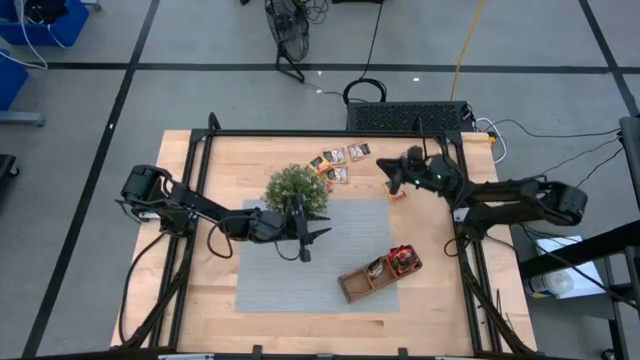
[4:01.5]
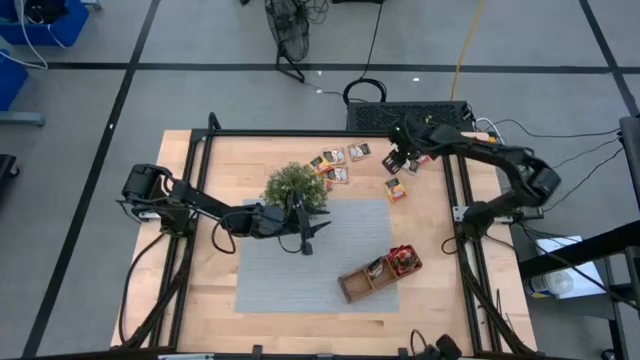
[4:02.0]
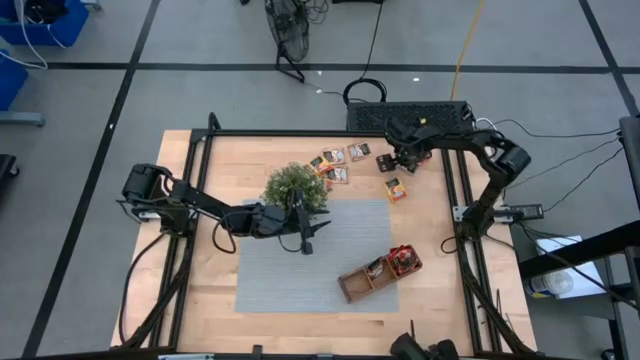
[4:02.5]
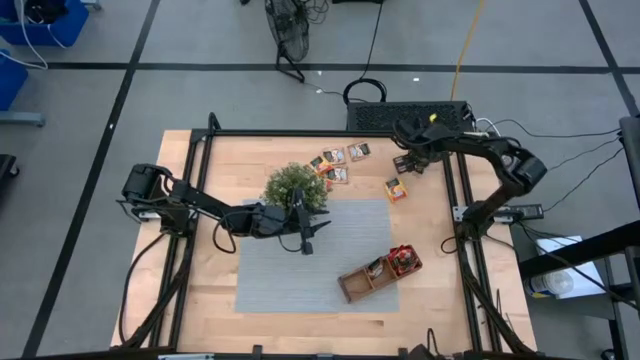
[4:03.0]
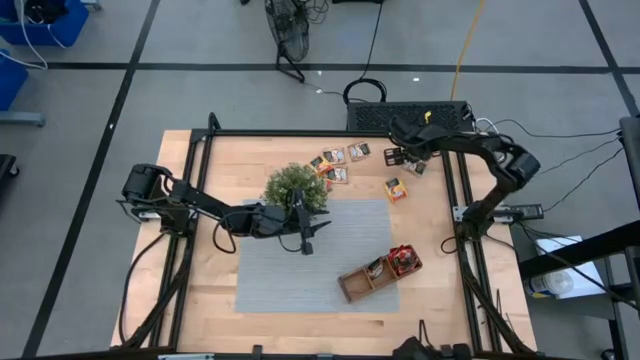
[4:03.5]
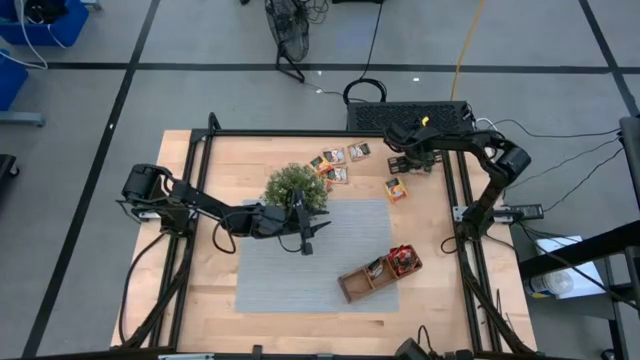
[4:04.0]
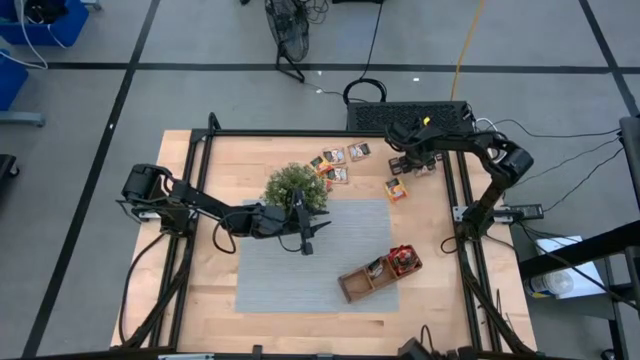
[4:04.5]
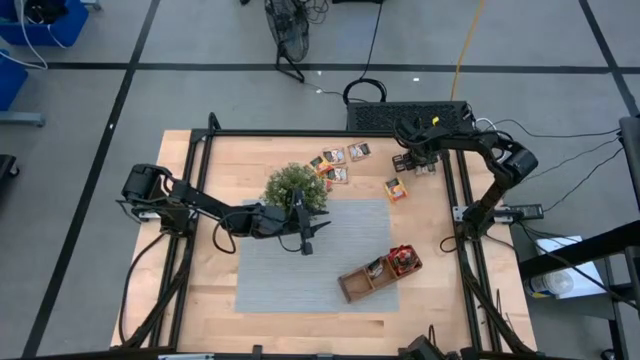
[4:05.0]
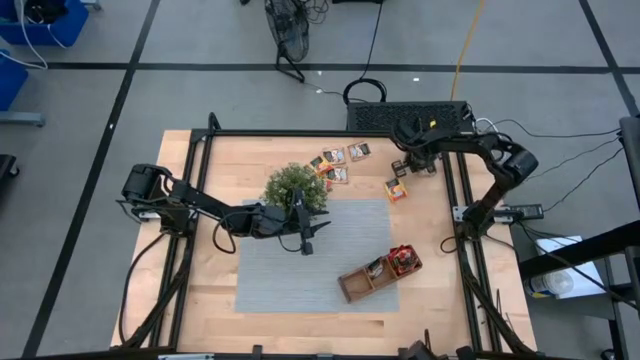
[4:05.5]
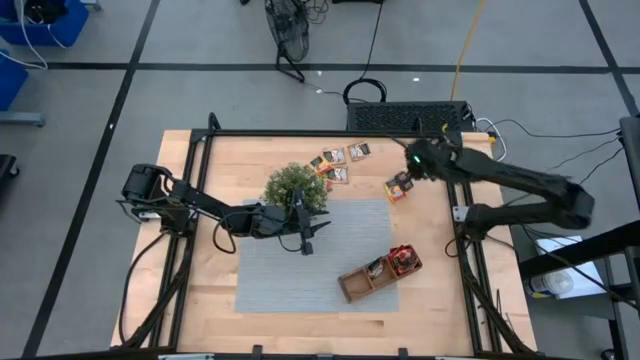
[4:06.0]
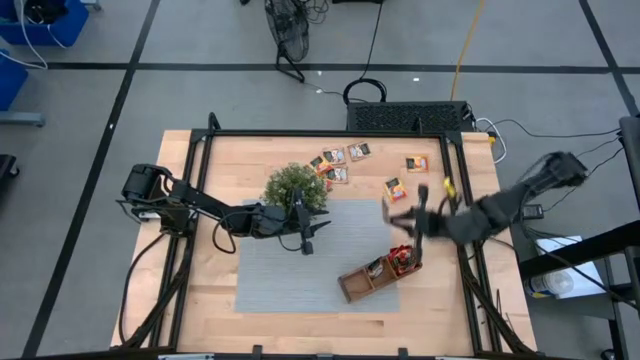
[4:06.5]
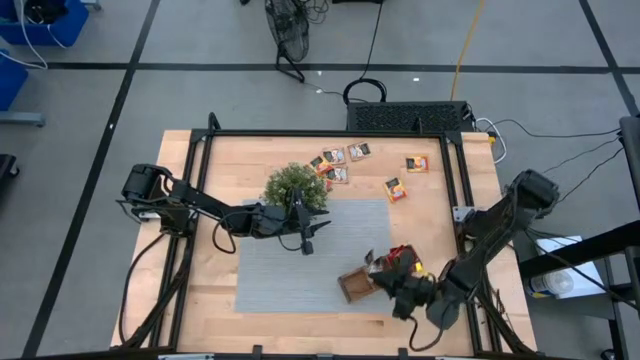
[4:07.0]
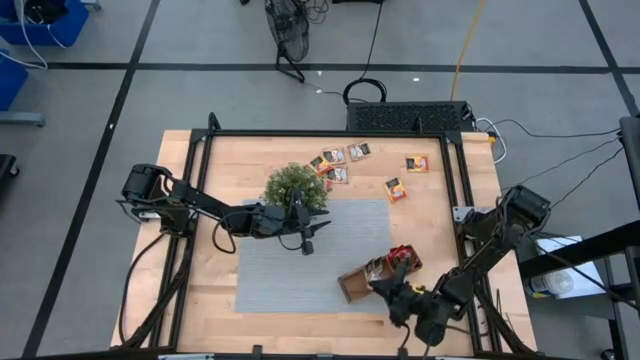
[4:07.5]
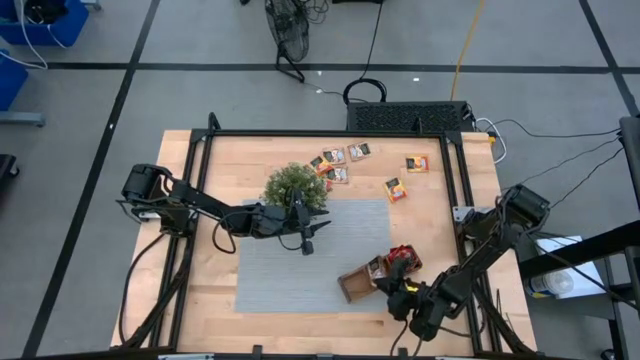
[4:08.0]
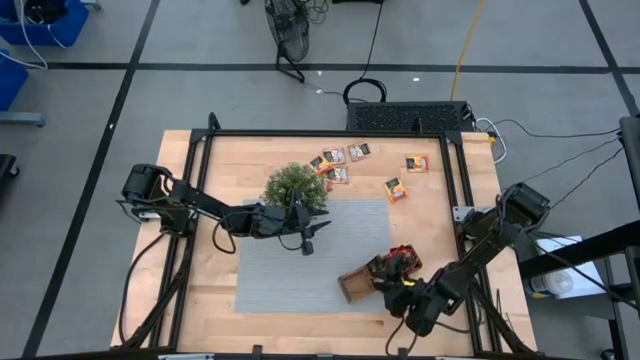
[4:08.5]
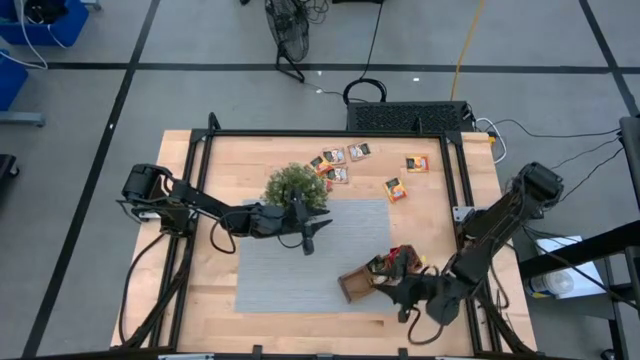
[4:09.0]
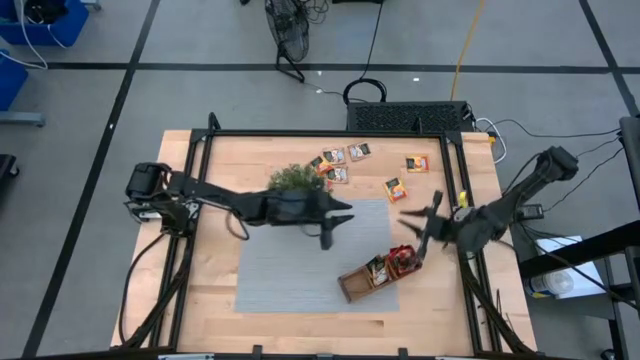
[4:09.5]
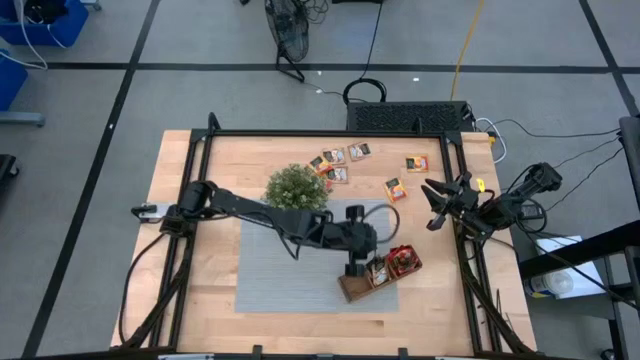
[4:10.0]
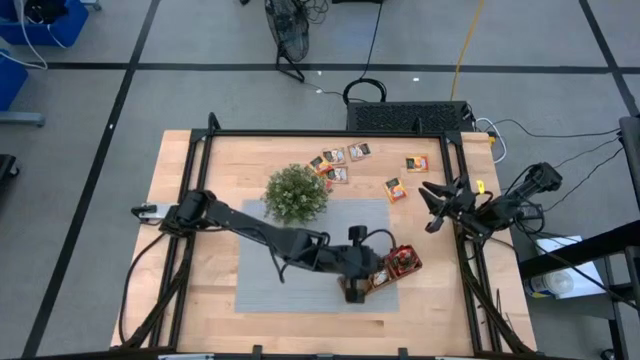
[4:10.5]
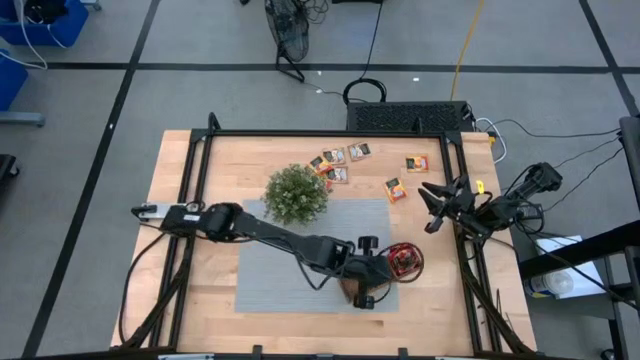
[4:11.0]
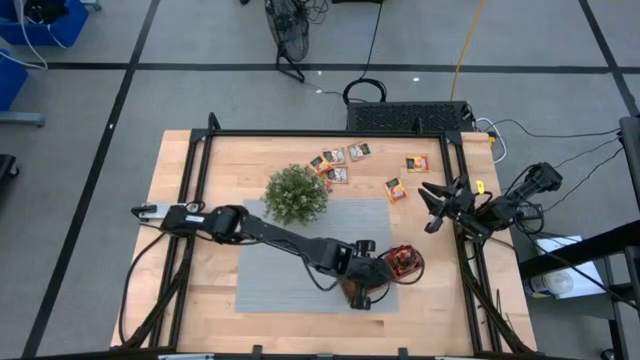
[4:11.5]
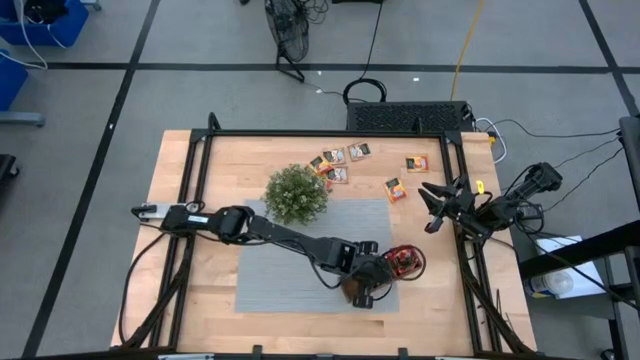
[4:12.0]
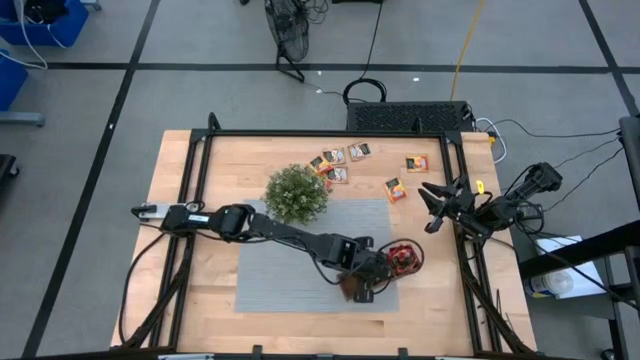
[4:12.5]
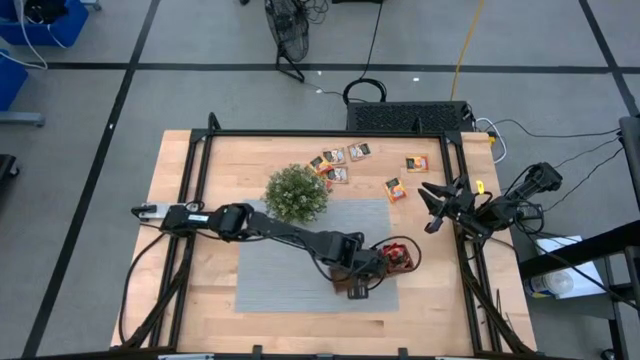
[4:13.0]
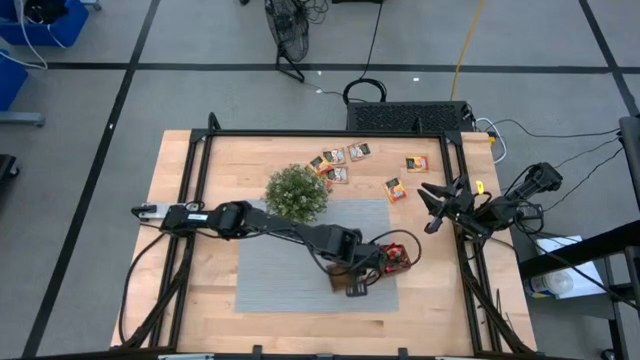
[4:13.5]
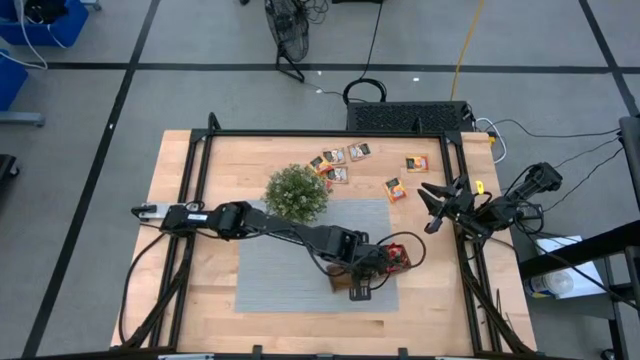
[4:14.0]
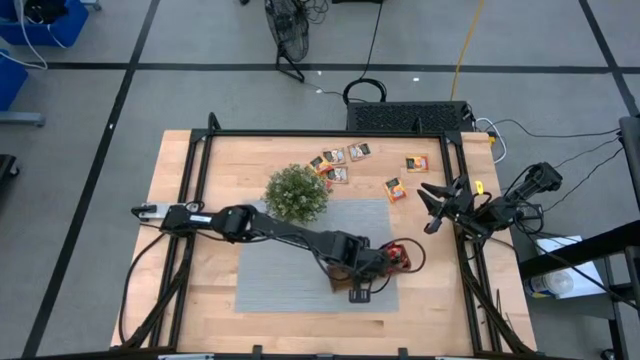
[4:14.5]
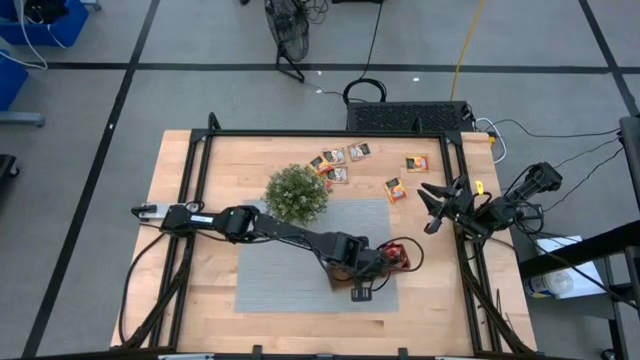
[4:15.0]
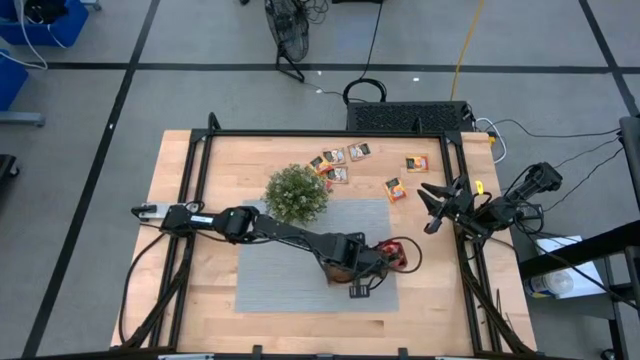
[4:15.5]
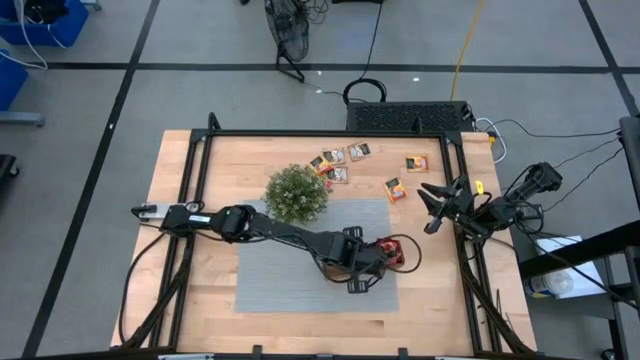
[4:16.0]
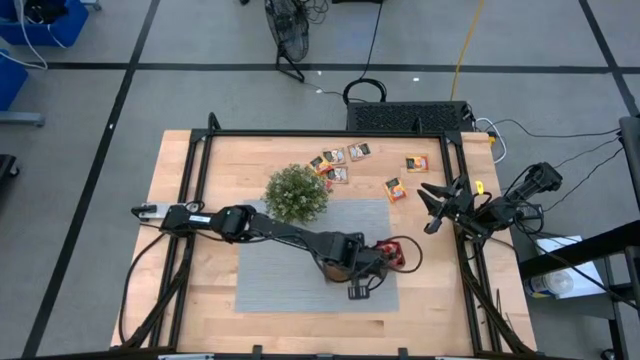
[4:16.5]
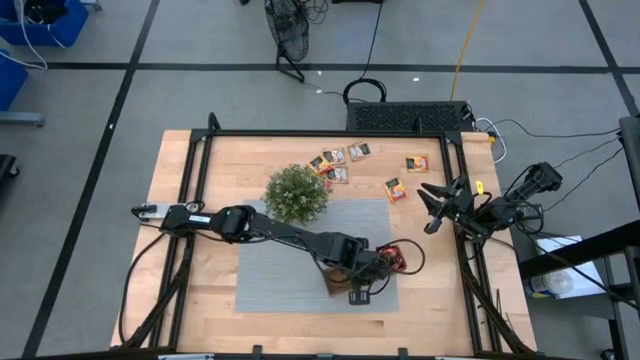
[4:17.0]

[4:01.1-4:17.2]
Task: Pick & Place Tea
Put the apple tea sachet into the brown organizer

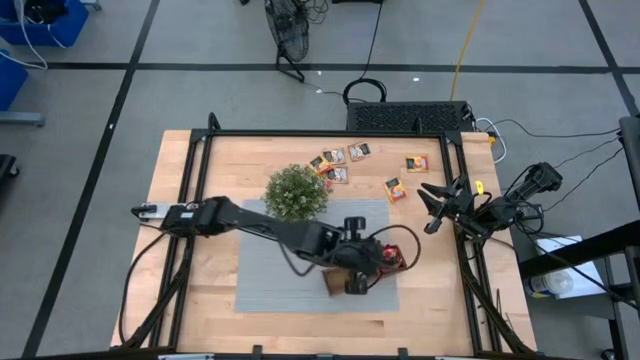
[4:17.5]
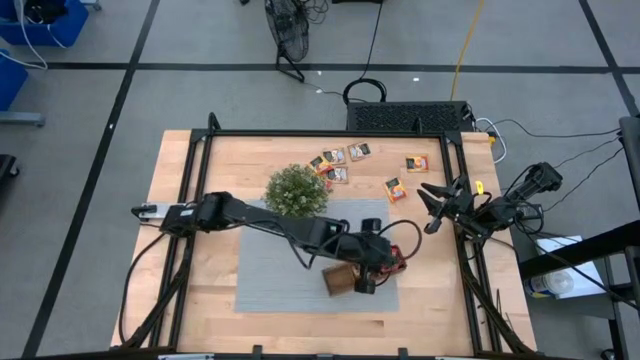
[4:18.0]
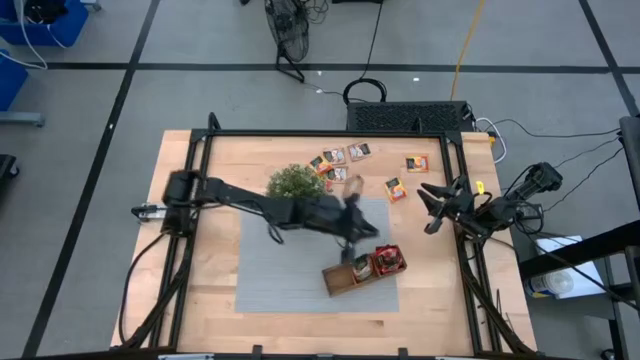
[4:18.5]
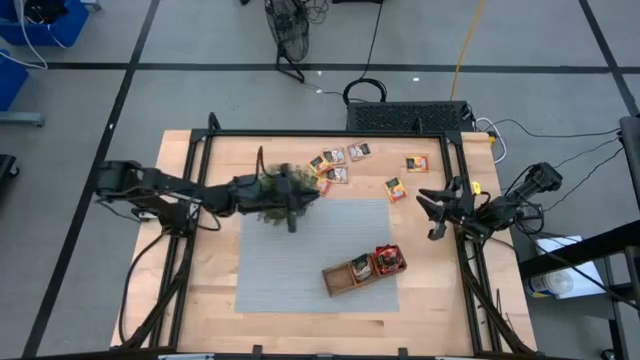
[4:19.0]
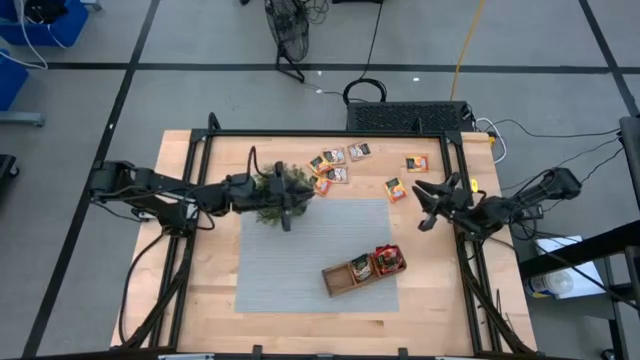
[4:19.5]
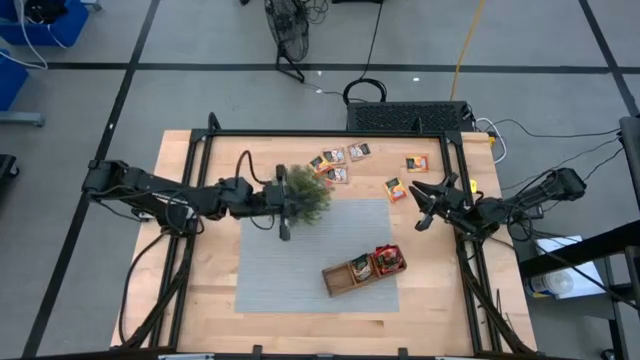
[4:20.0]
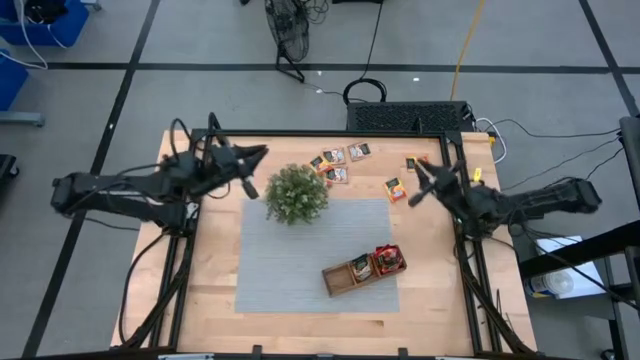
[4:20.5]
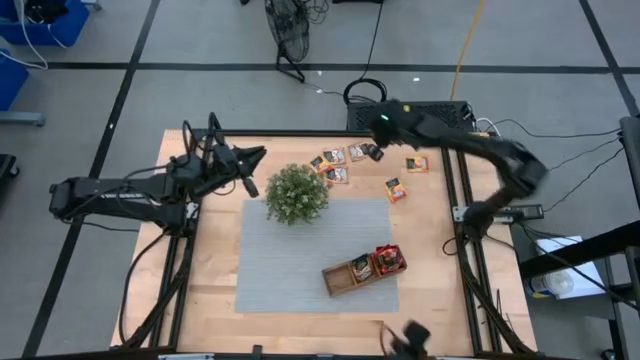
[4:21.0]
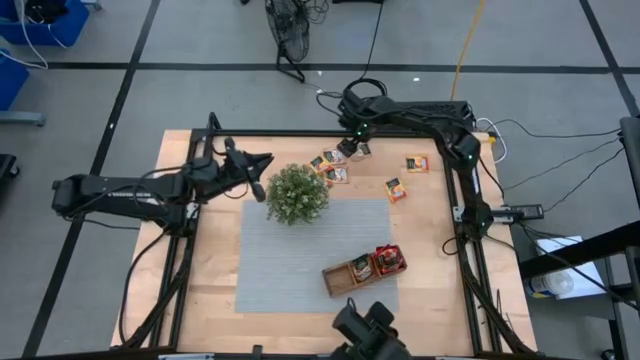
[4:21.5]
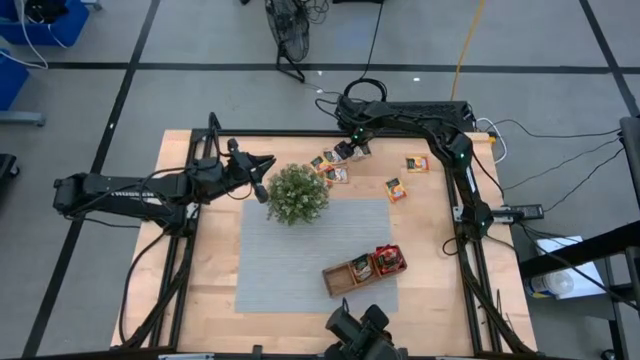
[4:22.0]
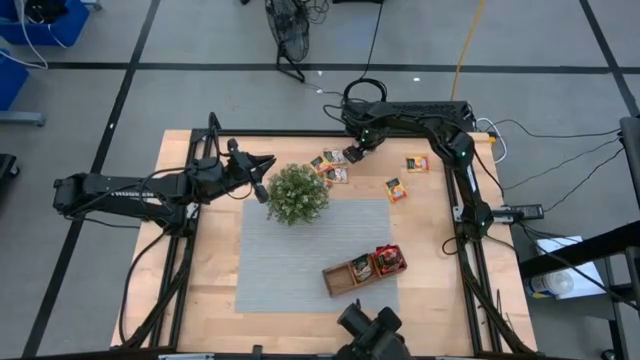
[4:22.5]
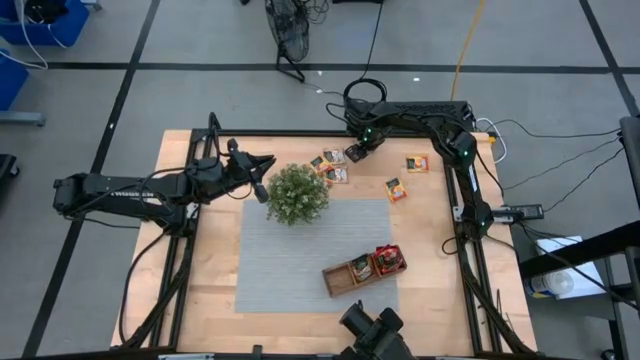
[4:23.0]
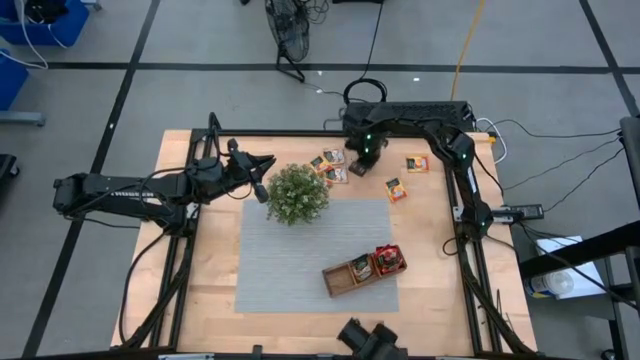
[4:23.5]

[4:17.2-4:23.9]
Put the apple tea sachet into the brown organizer
